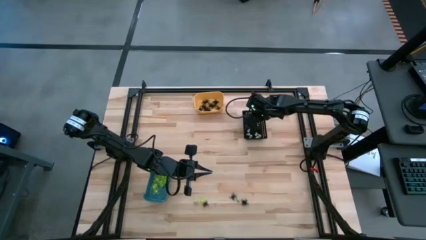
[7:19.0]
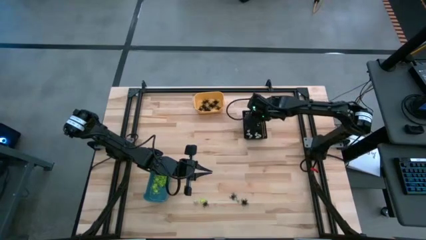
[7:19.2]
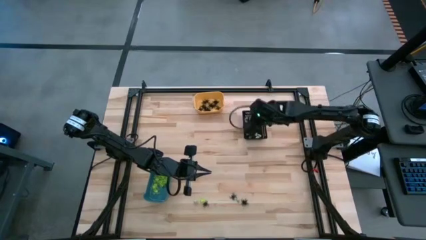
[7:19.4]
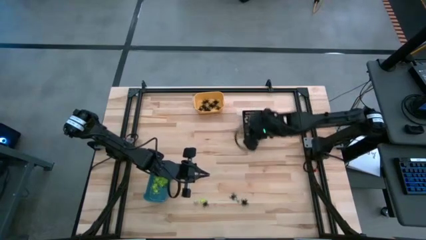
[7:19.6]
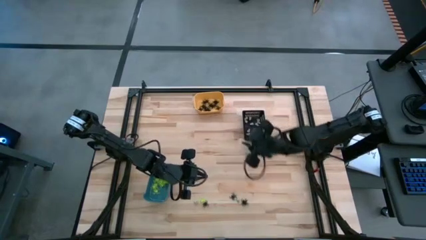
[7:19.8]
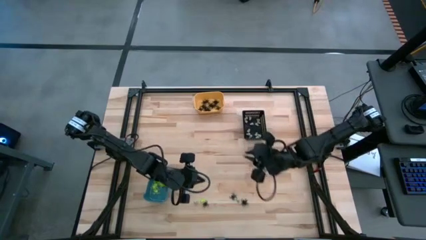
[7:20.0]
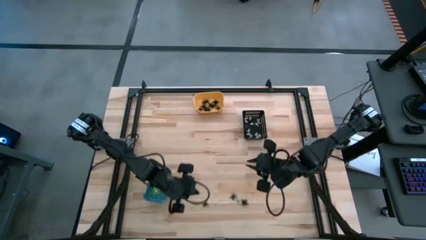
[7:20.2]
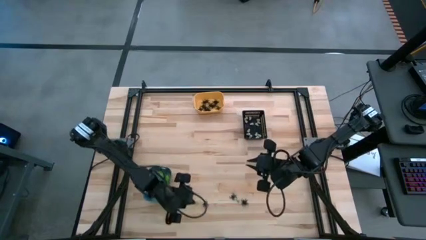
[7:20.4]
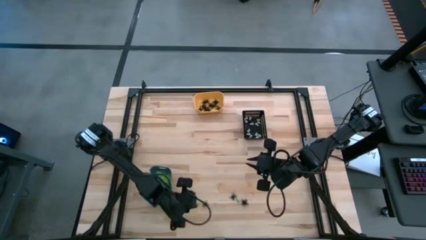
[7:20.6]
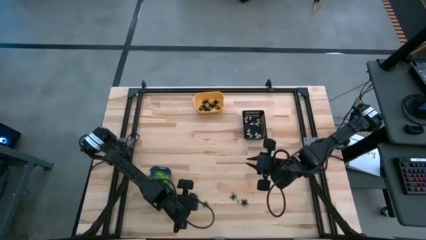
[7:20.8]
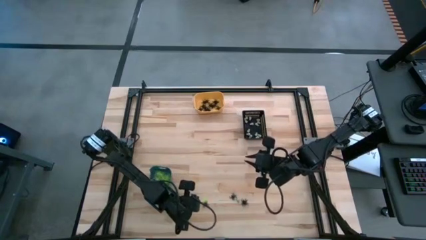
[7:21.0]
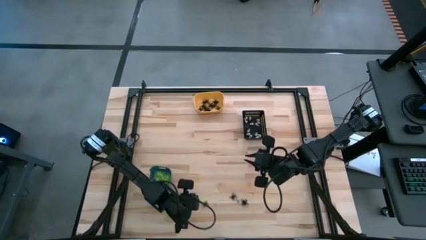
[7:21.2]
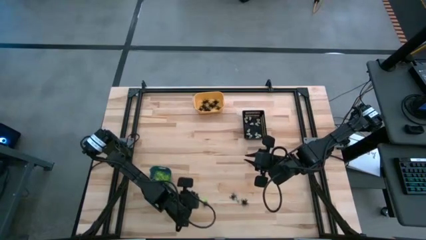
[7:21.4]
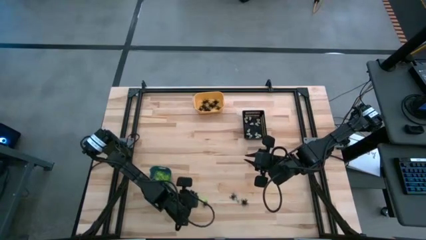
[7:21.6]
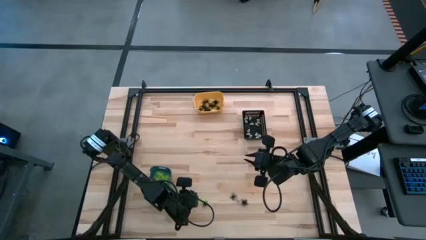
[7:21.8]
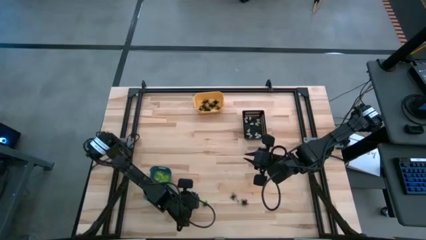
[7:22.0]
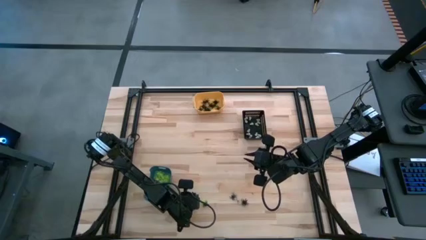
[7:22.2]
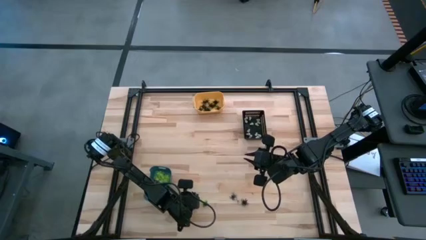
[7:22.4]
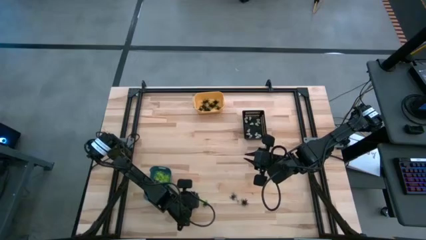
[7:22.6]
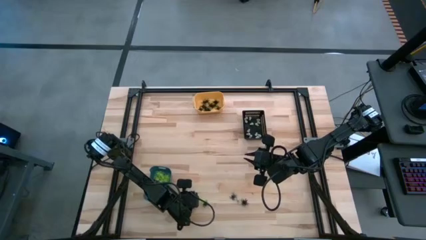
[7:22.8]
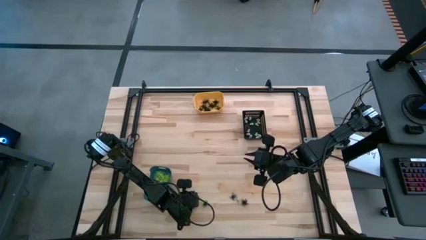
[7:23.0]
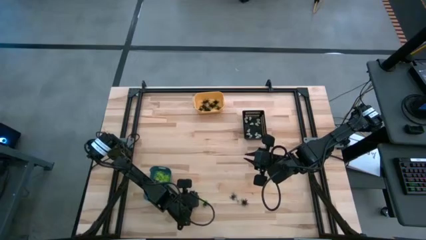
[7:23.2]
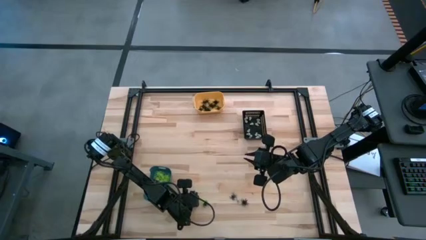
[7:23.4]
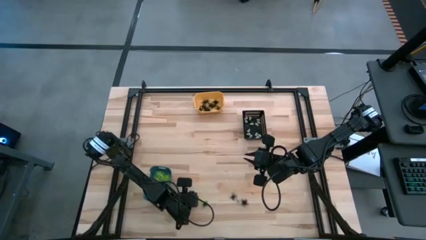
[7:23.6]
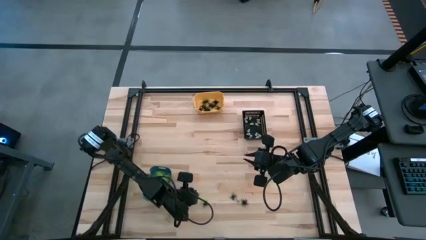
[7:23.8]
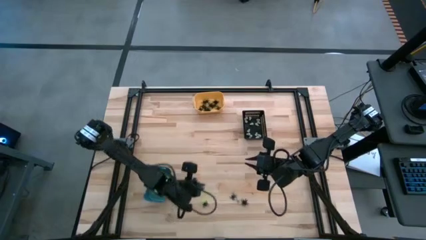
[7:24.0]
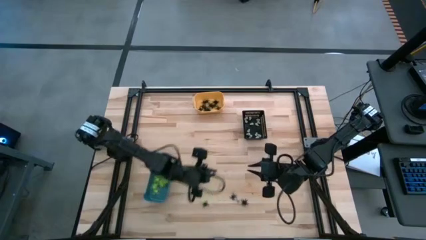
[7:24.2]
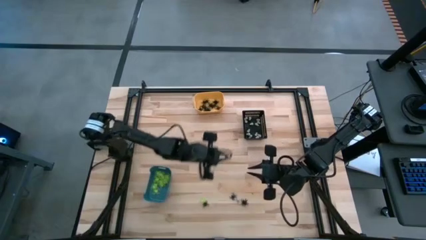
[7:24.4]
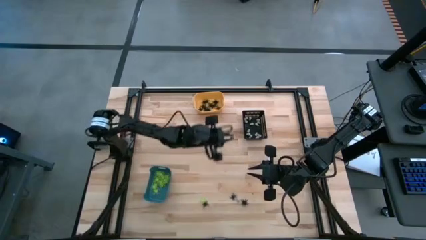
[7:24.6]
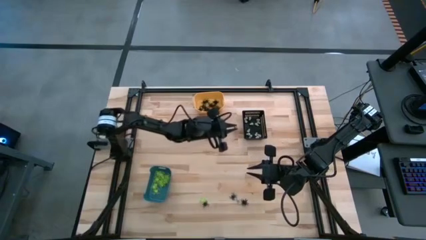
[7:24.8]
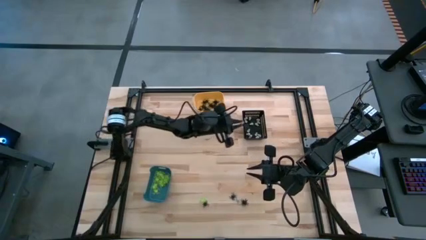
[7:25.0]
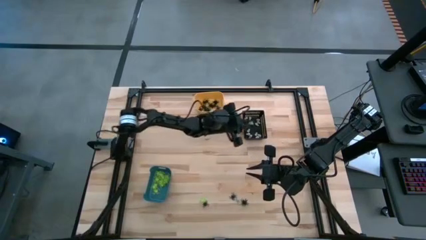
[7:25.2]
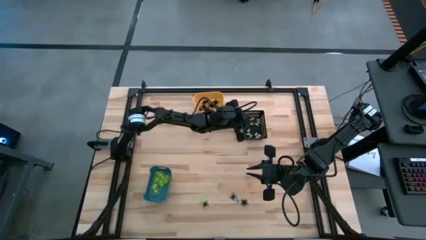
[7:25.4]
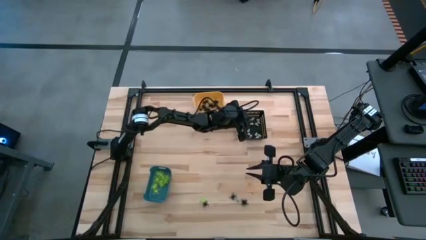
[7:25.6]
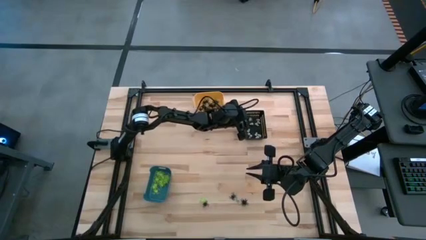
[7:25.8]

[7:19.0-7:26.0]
Task: Sort Halloween decoration
Put the white skull toy into the black bin

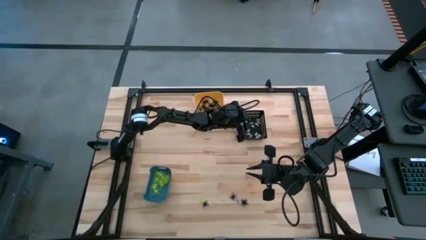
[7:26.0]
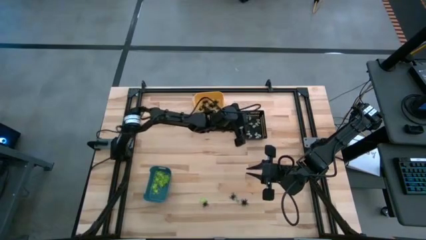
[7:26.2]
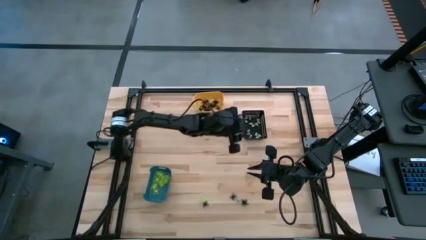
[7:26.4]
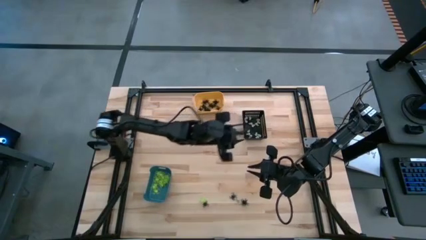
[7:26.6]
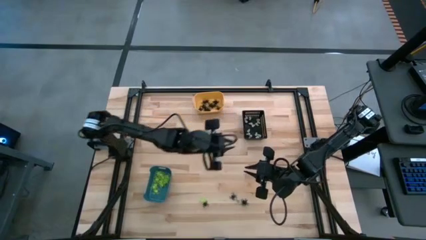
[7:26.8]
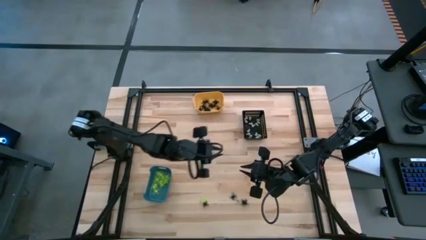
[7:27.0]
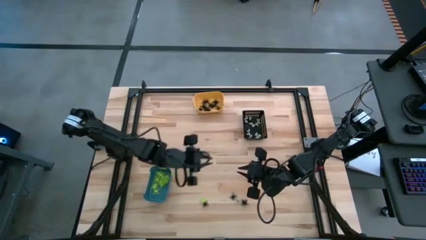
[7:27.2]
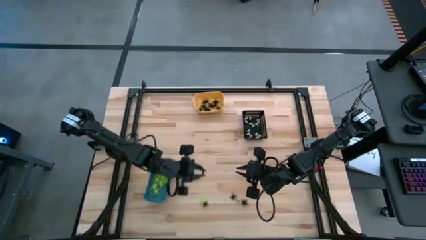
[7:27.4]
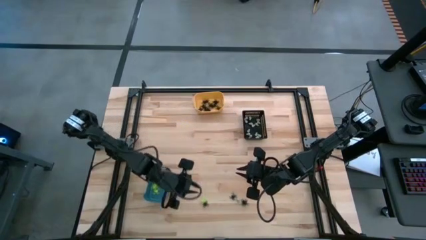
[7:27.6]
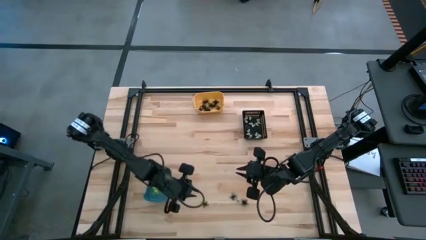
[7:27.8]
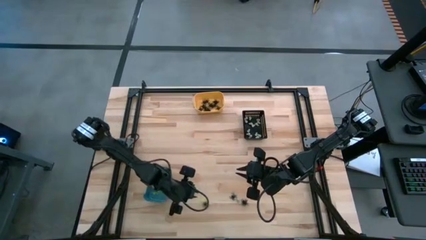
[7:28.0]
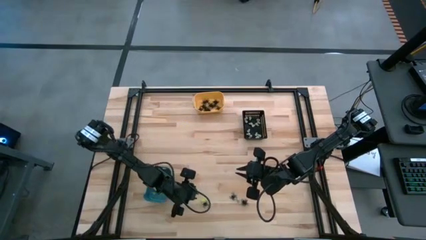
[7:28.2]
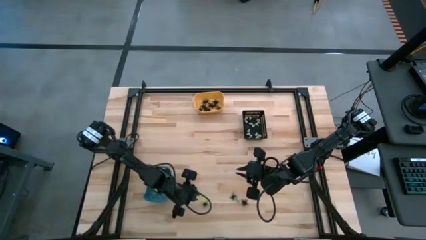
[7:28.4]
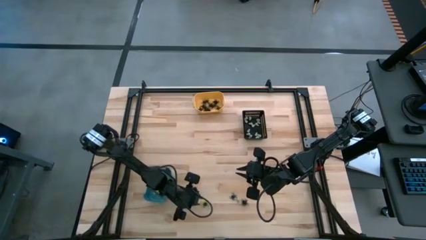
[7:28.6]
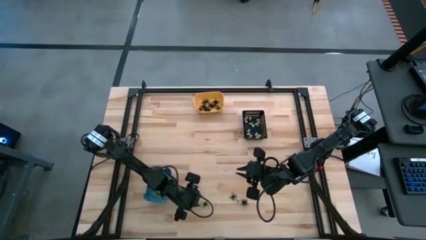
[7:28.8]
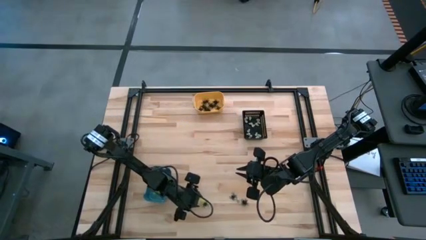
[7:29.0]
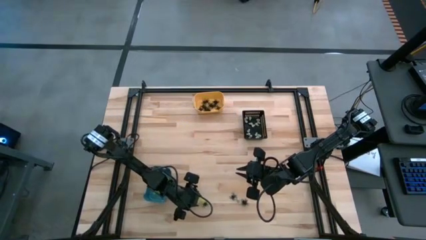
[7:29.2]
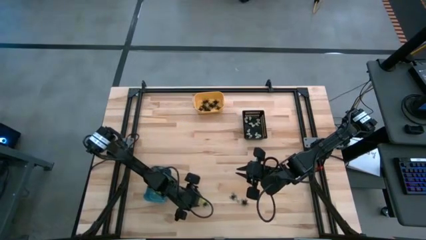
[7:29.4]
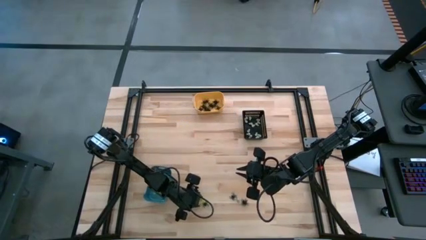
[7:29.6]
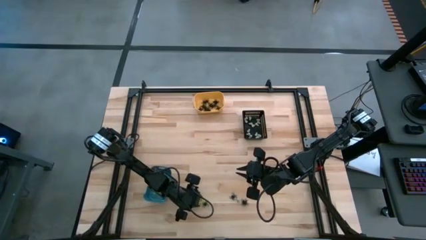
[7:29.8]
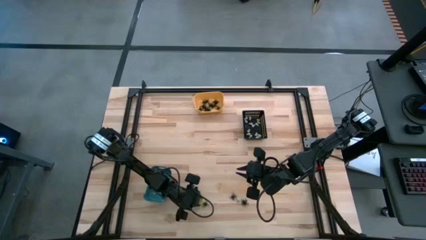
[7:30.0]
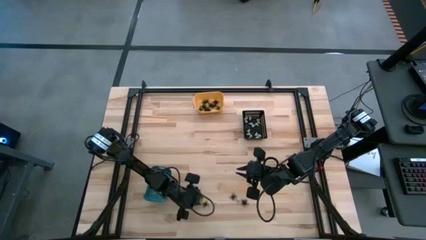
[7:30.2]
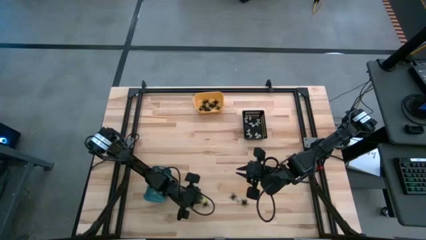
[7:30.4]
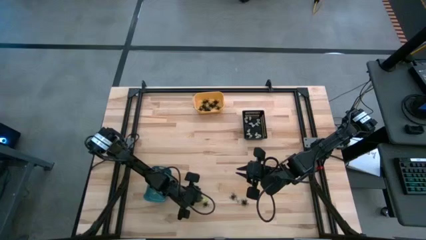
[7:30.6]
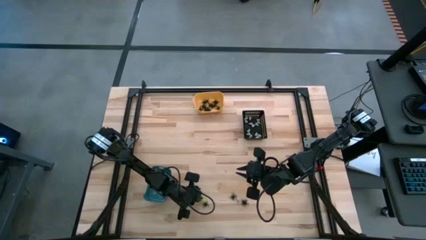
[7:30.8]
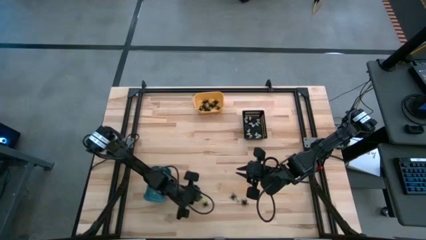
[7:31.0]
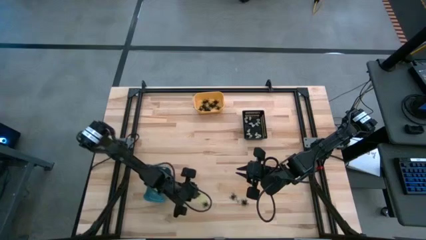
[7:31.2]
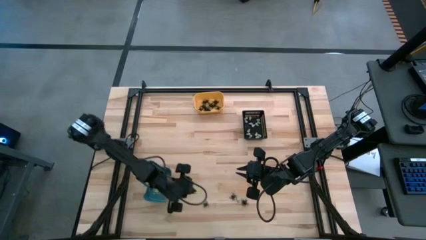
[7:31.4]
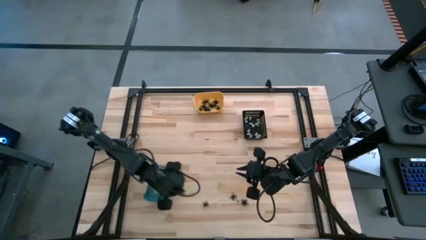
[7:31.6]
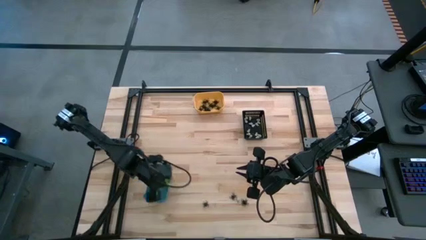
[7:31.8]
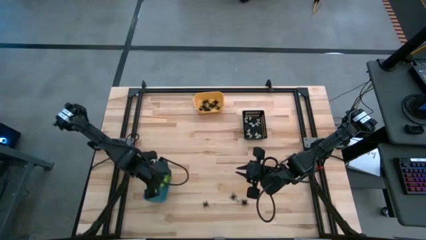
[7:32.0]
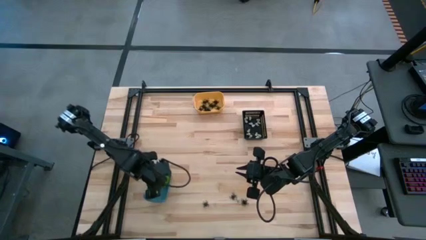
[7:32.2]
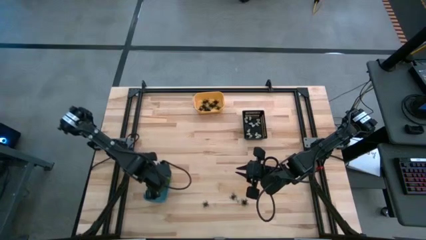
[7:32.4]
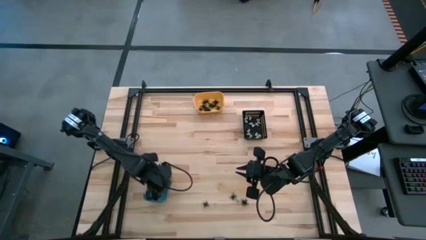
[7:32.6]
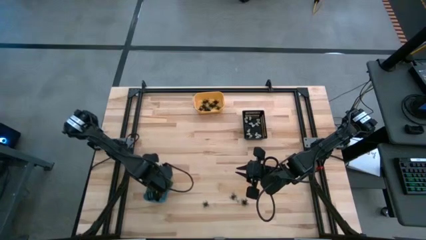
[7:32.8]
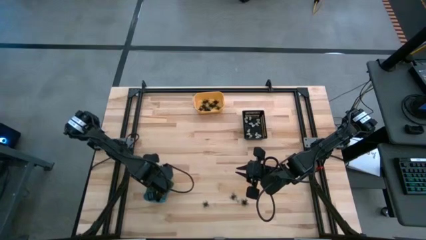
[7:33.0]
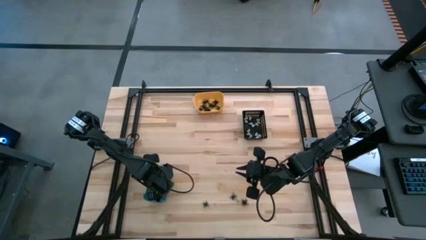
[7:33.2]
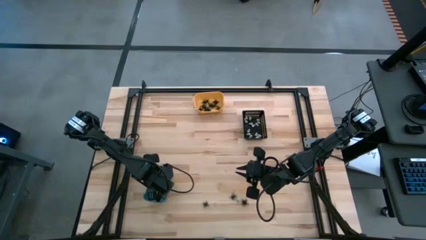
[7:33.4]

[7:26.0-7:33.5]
Put the green spider toy into the blue bin

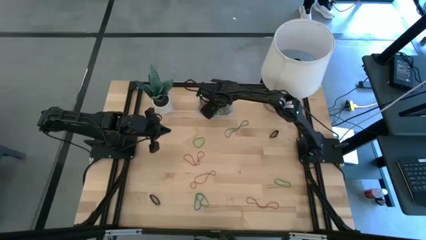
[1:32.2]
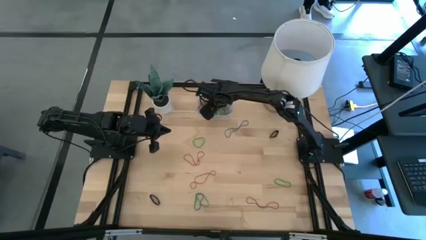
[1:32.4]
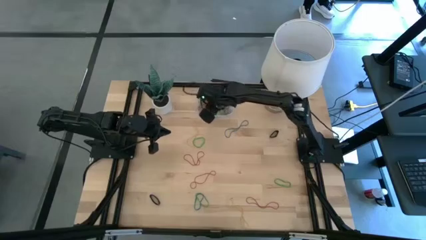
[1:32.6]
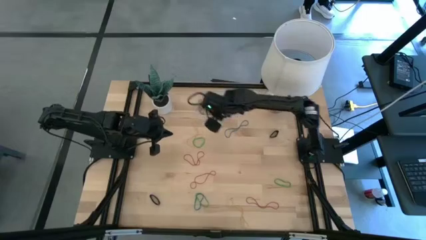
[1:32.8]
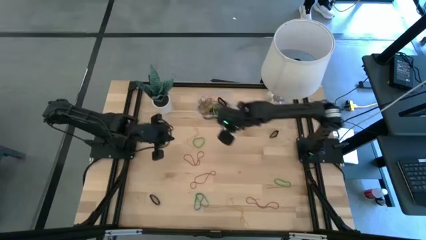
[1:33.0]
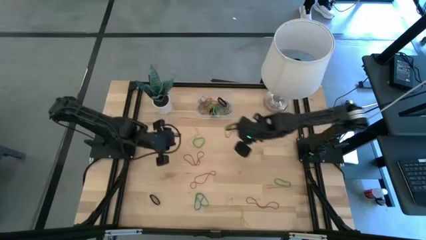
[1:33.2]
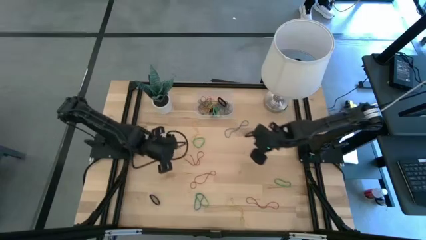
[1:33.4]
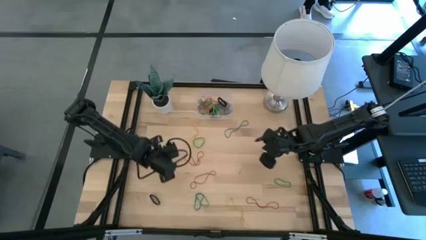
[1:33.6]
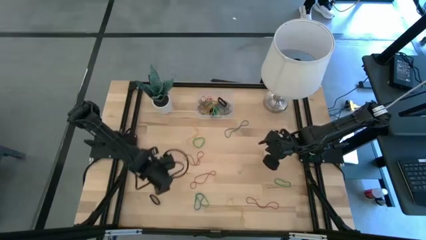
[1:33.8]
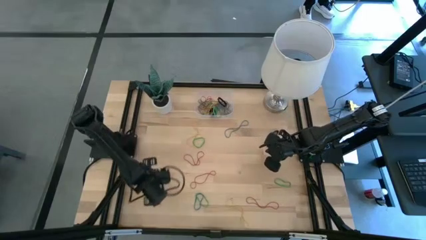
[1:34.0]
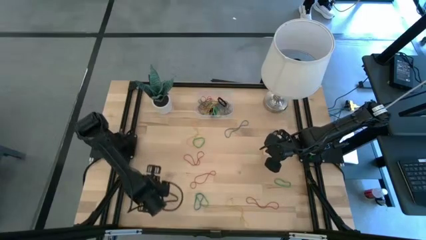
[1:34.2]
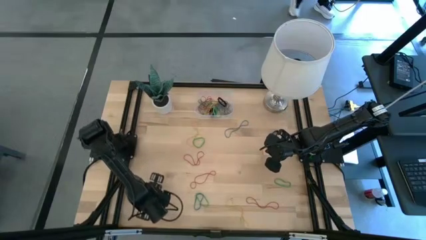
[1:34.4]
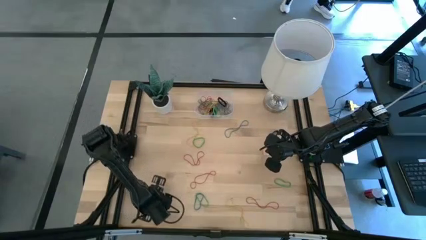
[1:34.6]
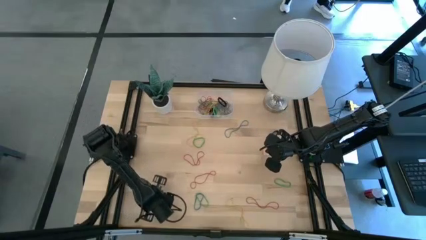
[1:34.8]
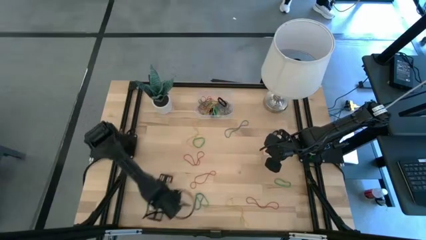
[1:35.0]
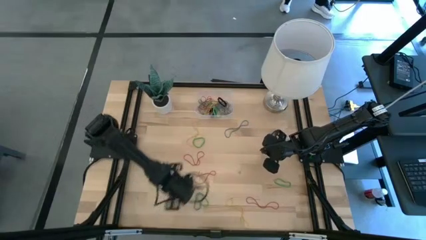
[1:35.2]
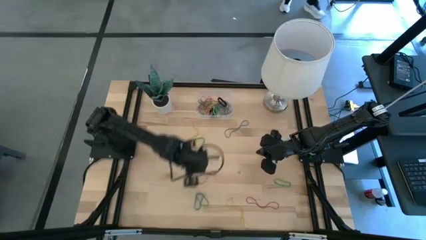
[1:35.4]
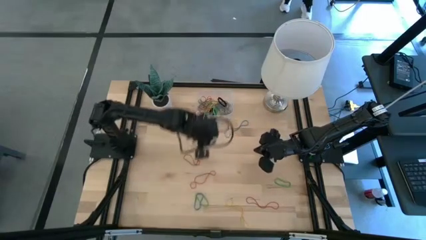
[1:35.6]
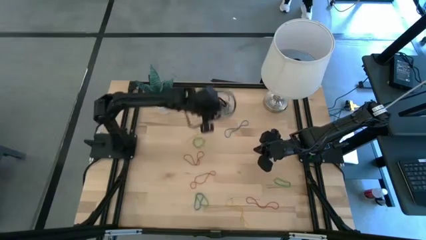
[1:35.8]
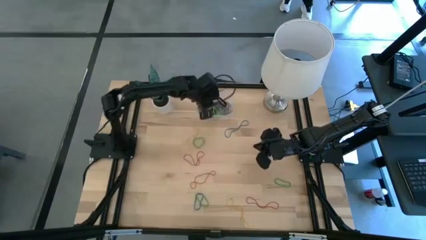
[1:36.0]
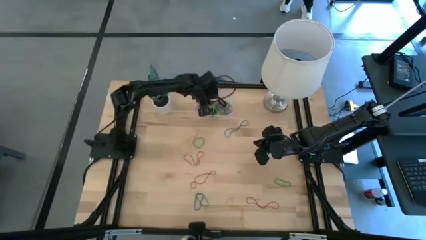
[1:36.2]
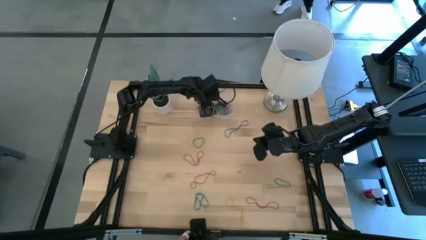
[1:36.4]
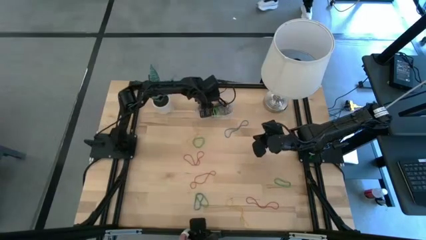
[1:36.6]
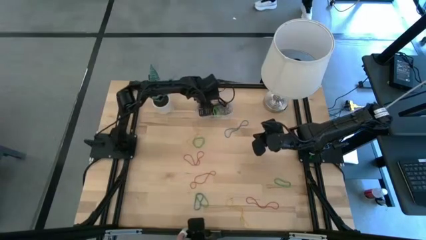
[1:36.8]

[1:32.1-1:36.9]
Task: Pick and place rubber bands into bin
Put the black rubber band into the transparent bin
